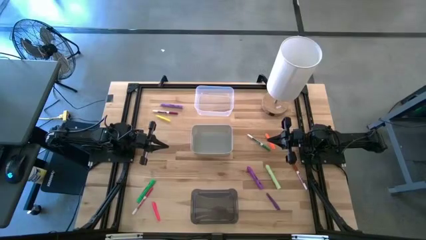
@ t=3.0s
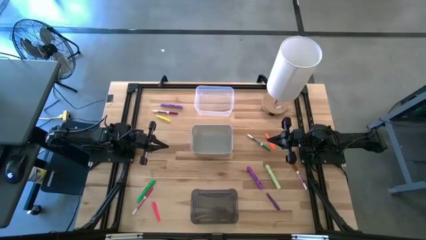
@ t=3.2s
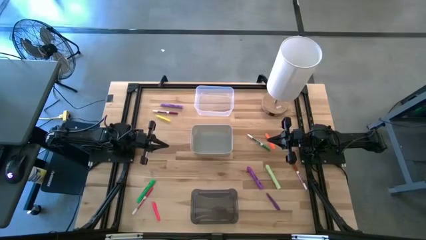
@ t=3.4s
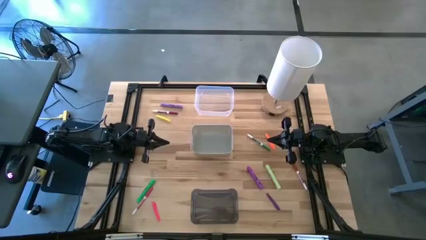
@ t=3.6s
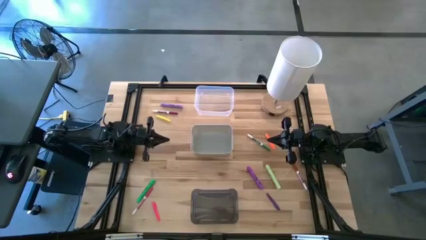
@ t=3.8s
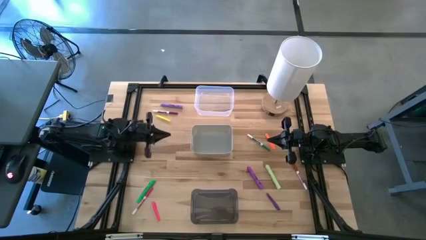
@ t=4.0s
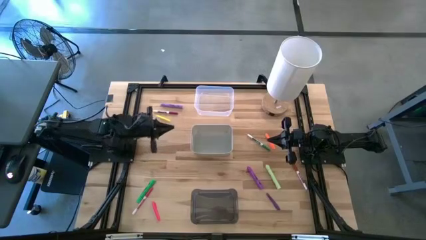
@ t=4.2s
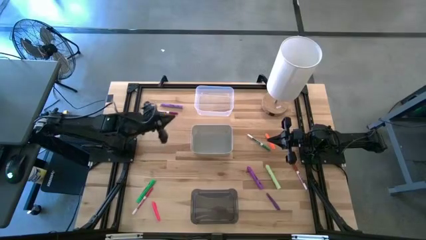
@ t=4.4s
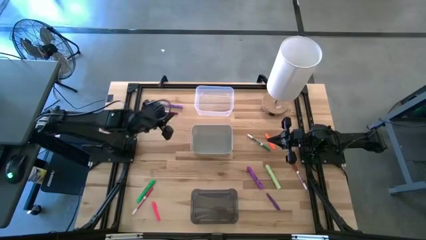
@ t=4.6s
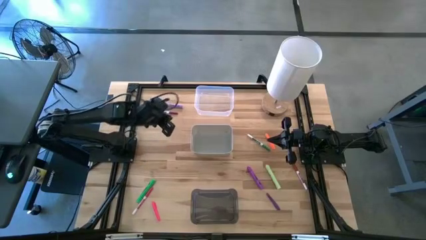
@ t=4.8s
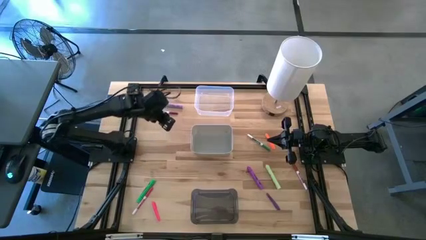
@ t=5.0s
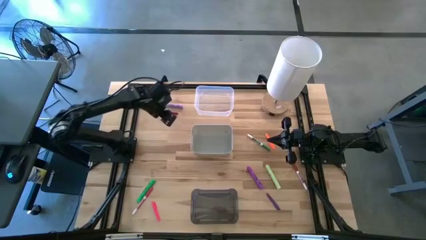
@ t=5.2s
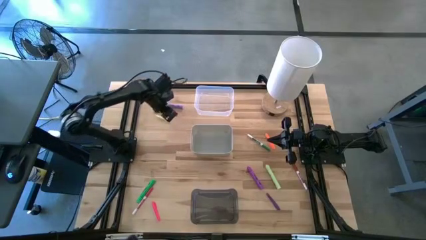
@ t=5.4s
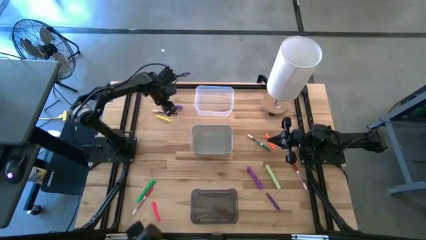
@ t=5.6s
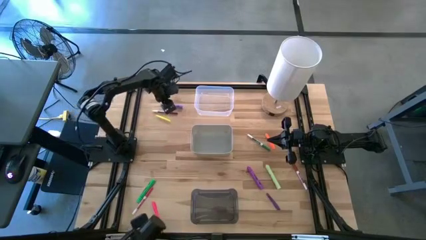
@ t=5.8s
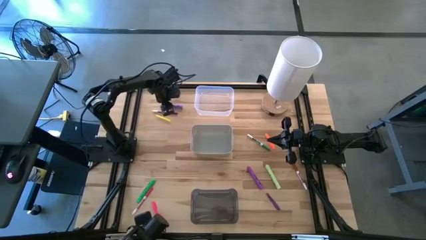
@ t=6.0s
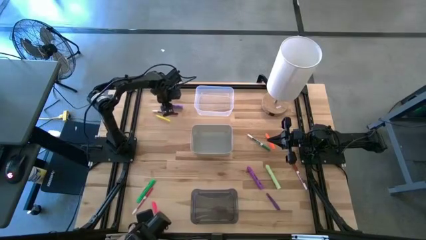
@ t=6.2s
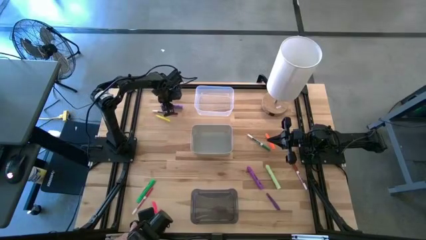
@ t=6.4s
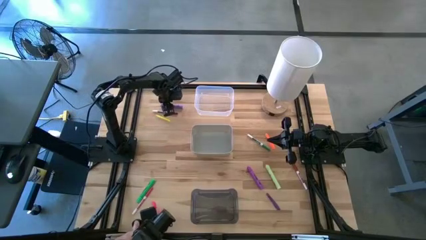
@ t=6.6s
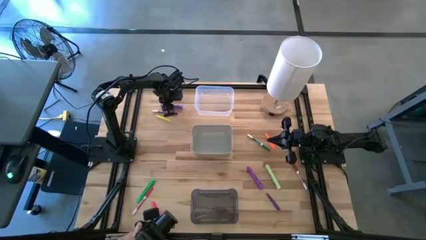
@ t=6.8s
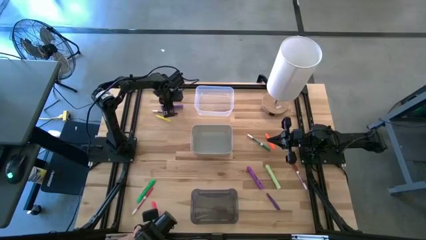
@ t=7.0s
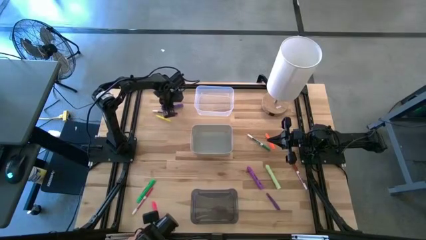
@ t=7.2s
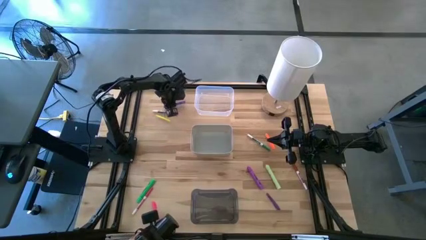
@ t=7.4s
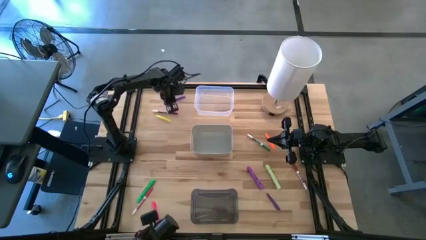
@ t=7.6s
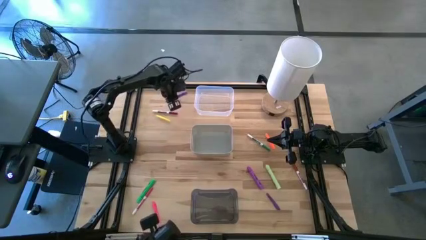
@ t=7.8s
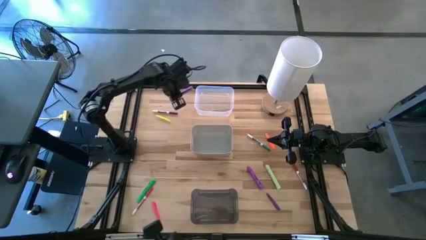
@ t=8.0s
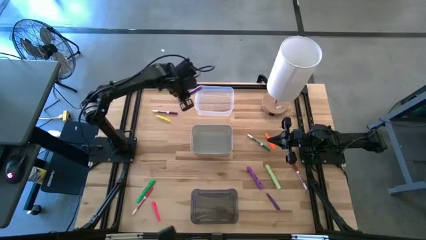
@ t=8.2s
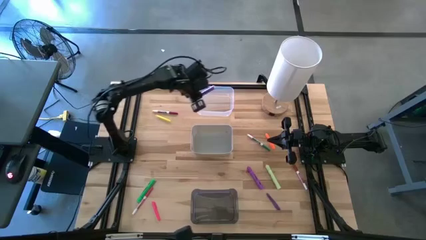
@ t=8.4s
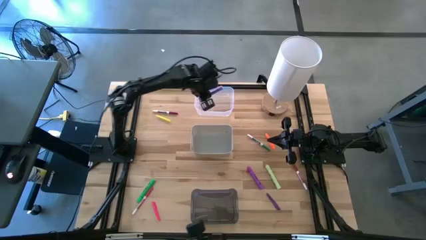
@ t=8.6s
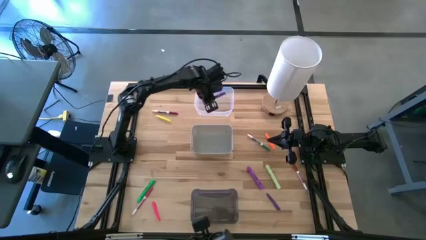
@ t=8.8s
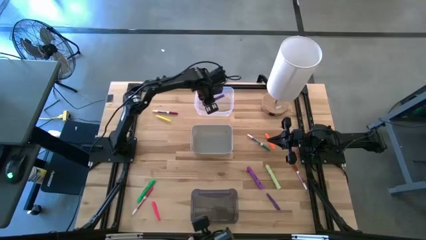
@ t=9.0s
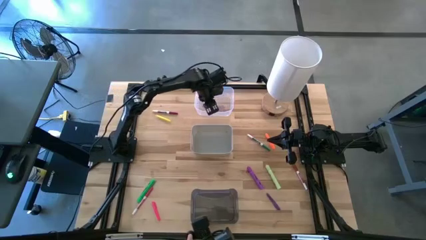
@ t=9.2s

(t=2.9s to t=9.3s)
Task: Pick & Place Markers
Put the violet highlighter into the transparent bin

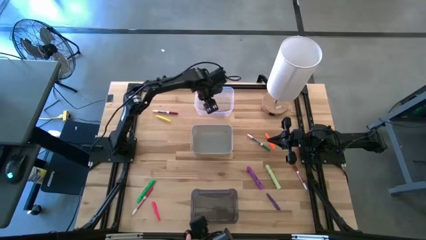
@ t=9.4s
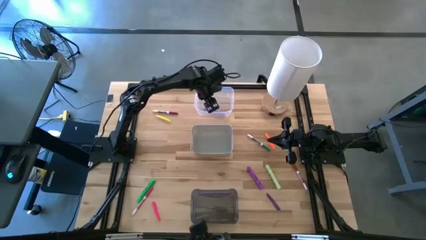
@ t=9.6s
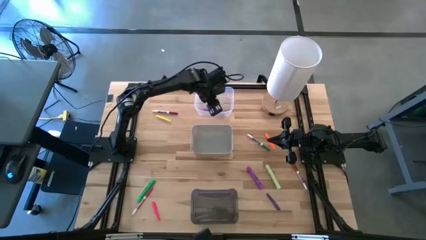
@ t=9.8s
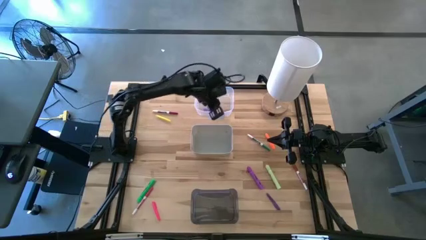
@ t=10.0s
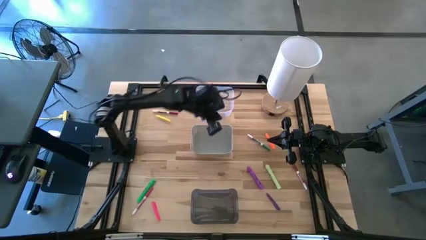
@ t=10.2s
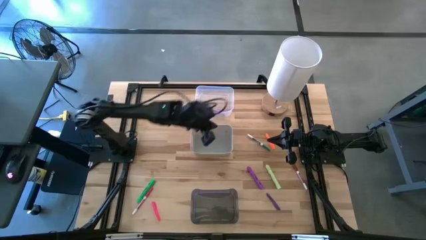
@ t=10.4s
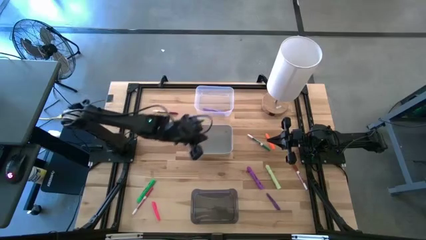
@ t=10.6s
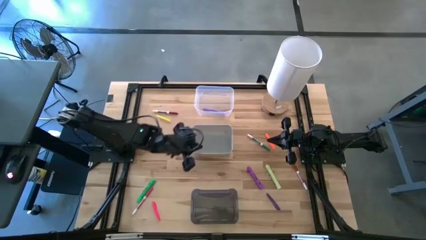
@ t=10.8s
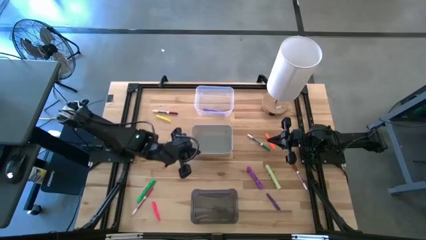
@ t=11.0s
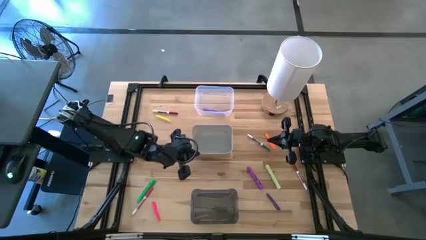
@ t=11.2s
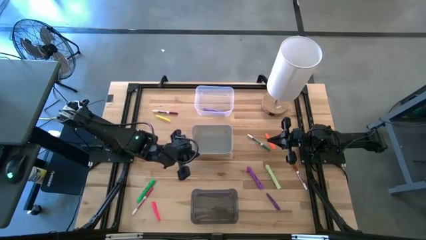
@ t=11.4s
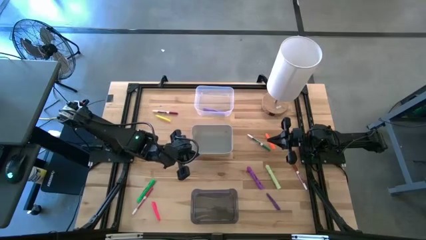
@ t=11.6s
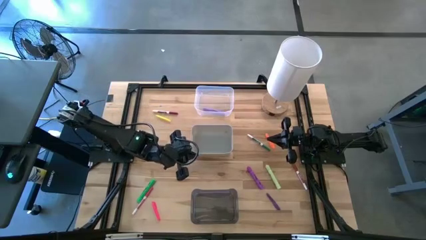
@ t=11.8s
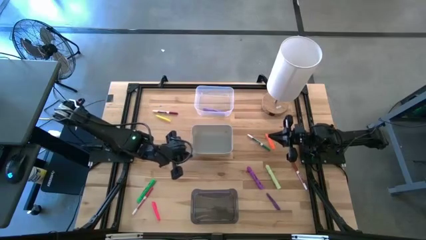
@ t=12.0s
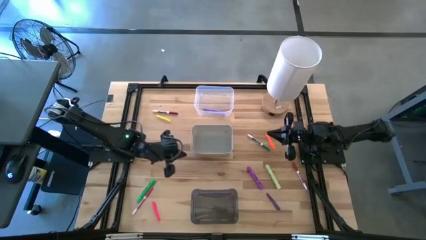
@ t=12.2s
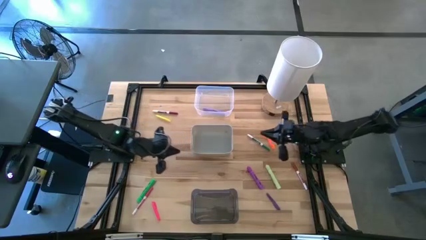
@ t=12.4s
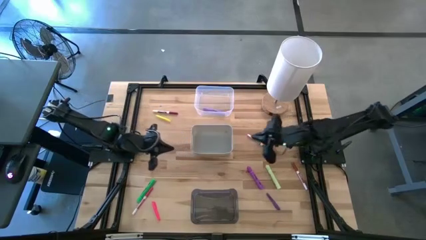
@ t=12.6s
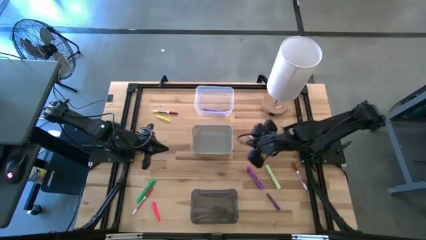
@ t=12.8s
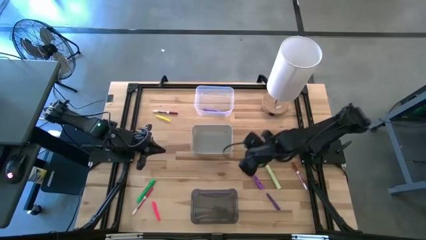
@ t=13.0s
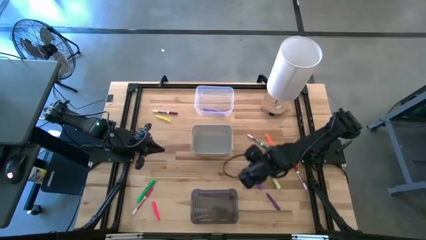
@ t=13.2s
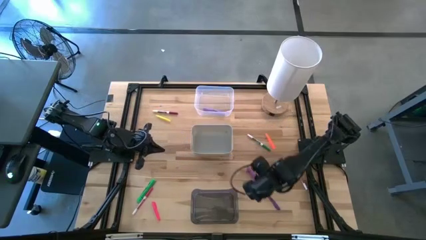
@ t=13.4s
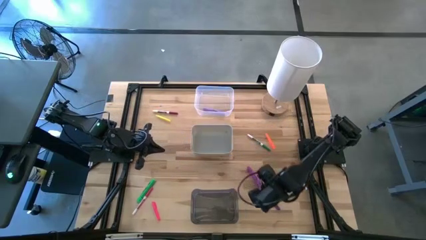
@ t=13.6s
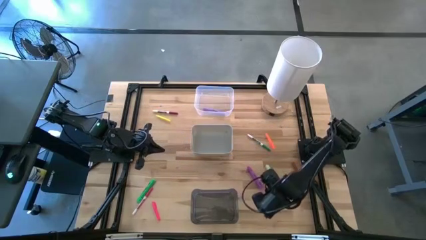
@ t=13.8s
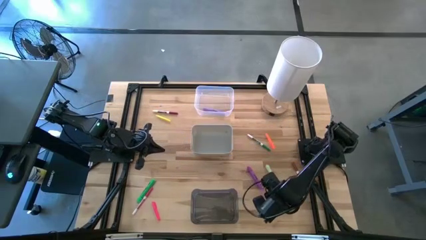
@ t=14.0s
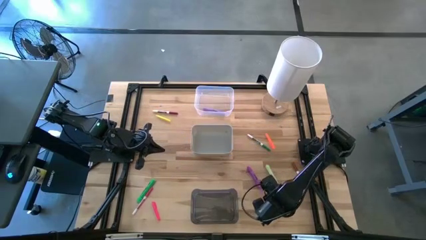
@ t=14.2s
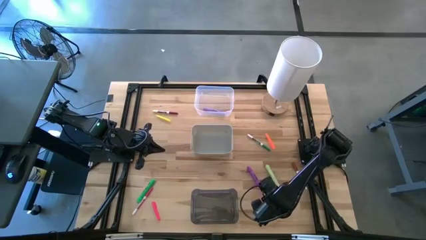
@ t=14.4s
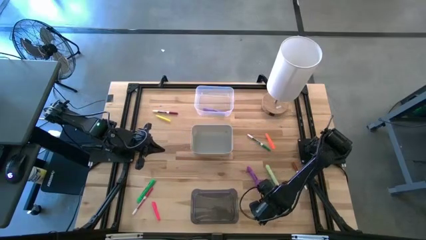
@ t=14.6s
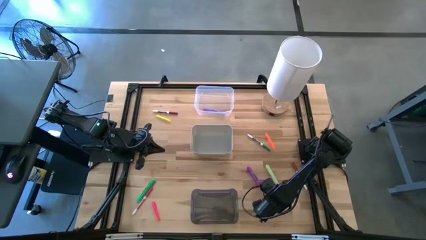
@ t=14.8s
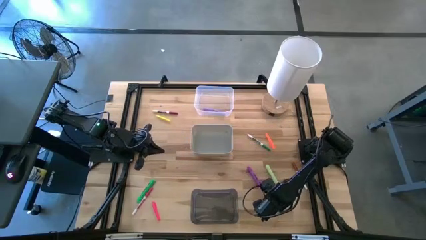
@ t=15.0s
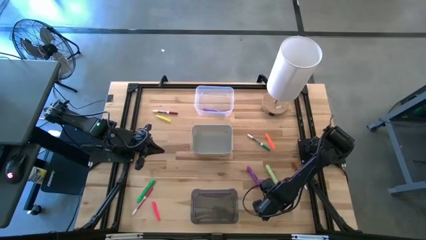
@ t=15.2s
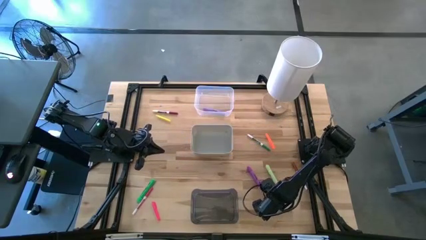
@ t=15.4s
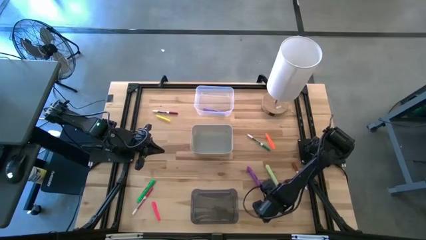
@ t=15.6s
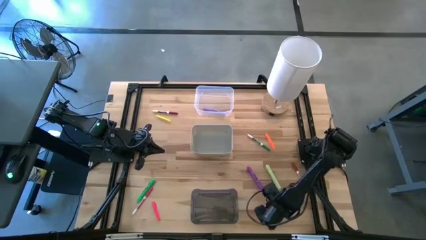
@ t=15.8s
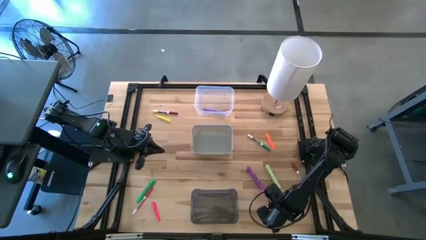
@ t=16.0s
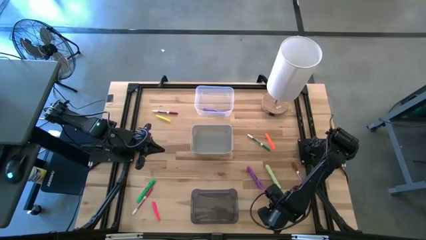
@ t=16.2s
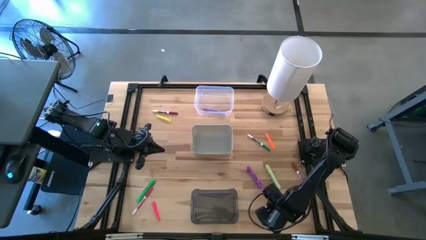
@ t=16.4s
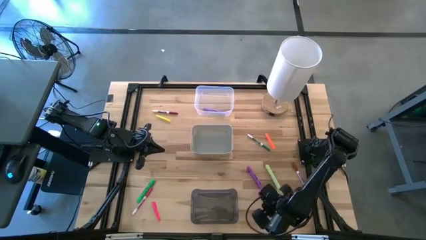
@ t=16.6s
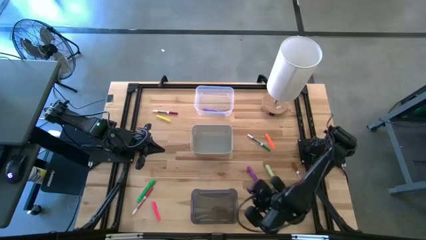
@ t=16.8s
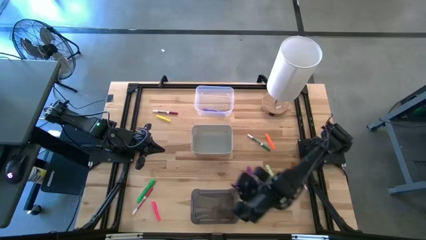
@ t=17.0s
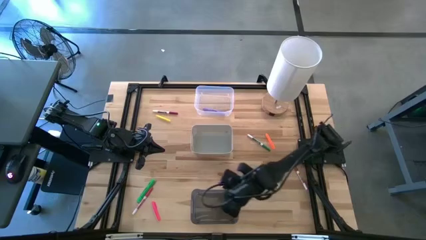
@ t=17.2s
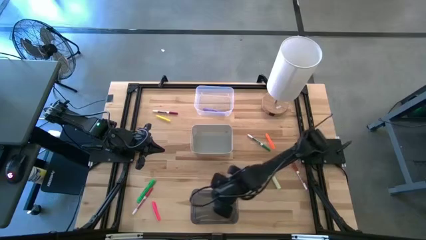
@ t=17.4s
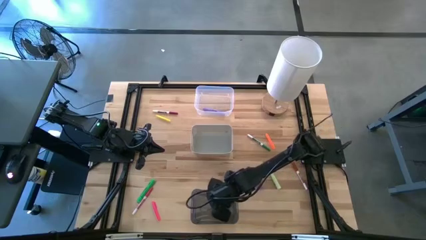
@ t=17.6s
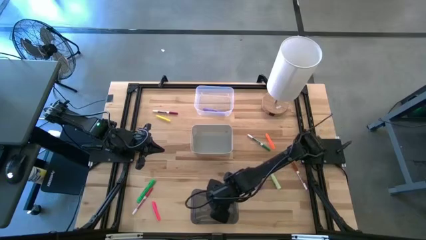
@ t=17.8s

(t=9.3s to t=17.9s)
Put the violet pen into the black bin

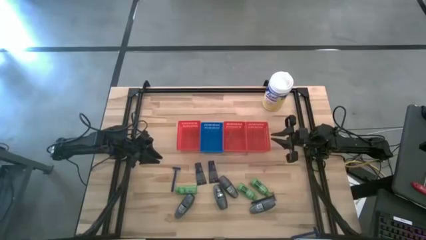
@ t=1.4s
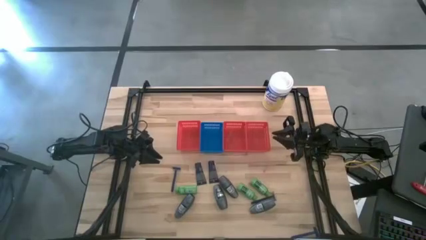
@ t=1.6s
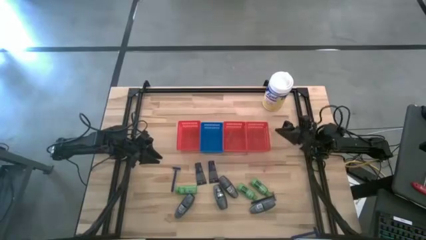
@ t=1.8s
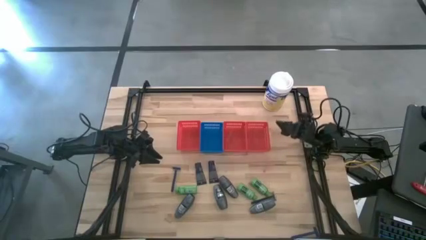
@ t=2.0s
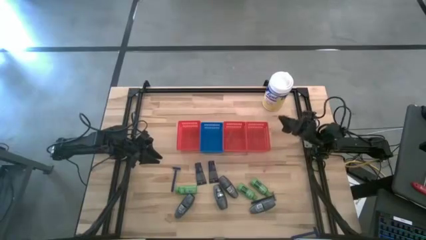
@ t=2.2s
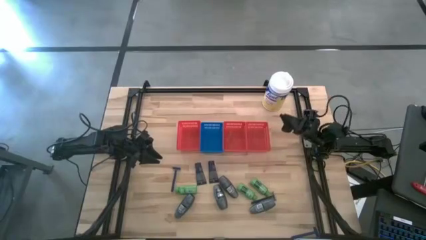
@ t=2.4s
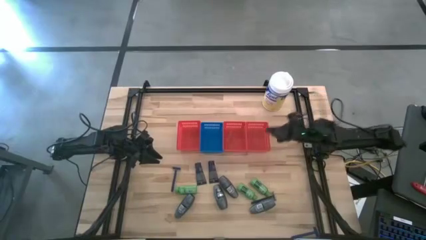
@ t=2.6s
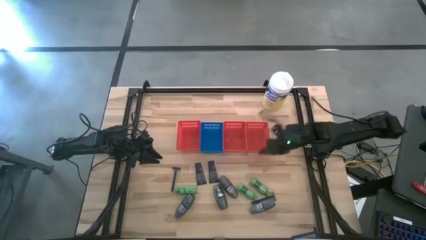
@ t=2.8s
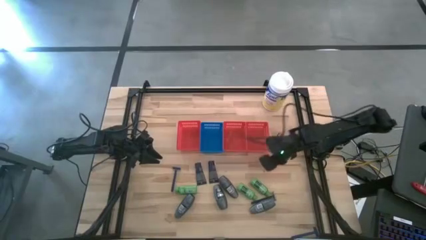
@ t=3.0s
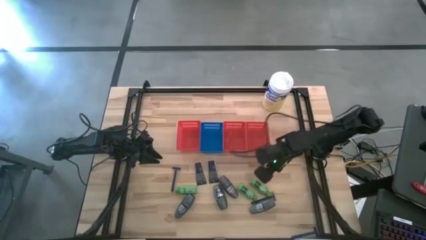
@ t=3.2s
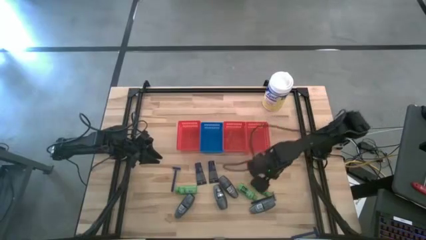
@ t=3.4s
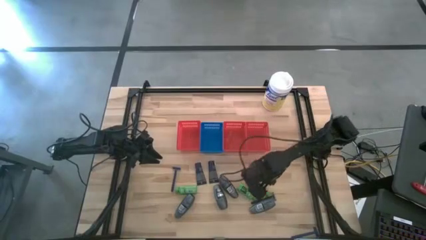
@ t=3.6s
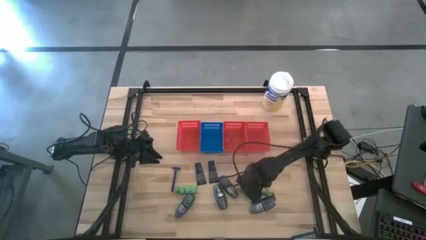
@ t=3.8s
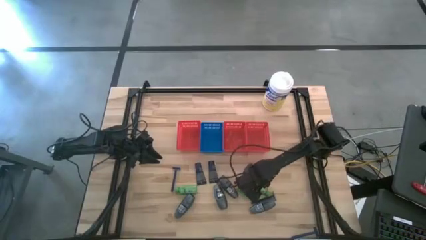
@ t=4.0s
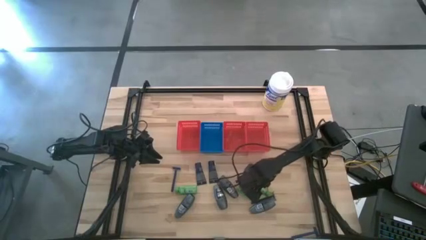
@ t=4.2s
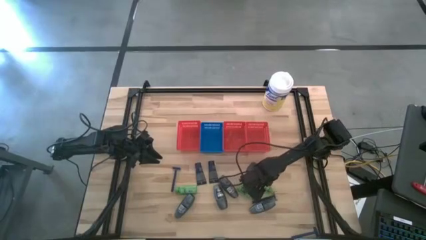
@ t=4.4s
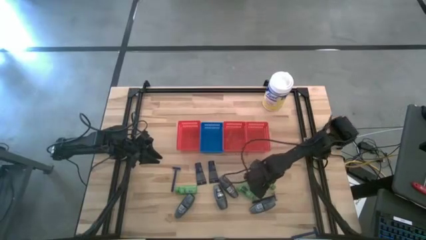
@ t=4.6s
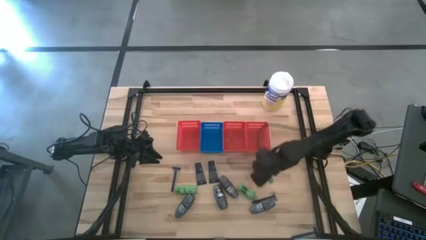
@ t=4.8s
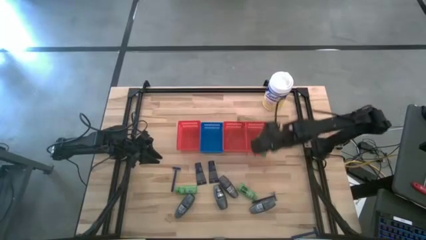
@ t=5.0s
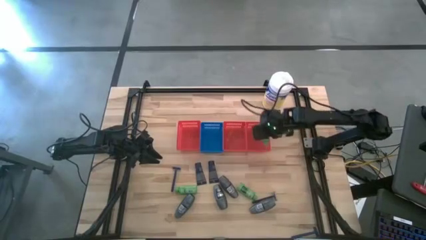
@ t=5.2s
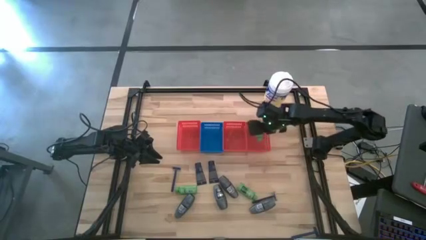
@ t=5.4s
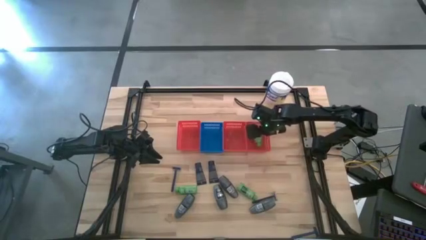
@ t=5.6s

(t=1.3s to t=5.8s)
Task: Pick & Place Travel size toiletries
Put the green shampoo into the right red basket
